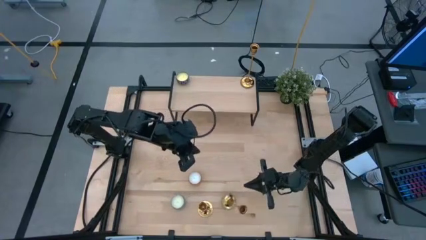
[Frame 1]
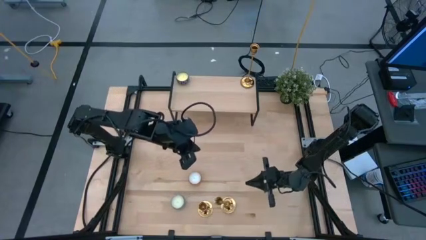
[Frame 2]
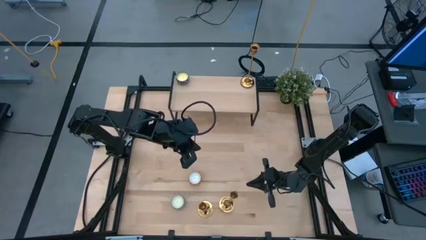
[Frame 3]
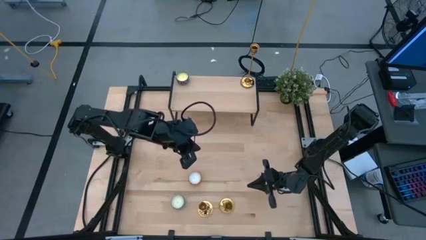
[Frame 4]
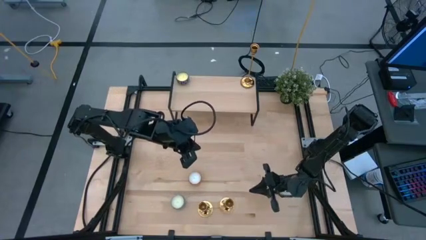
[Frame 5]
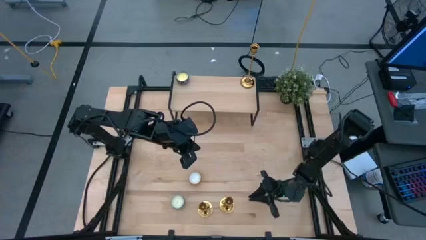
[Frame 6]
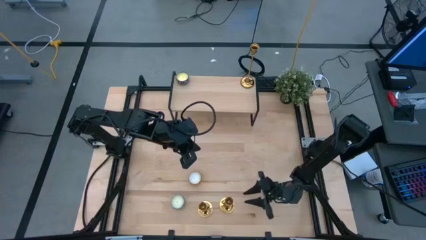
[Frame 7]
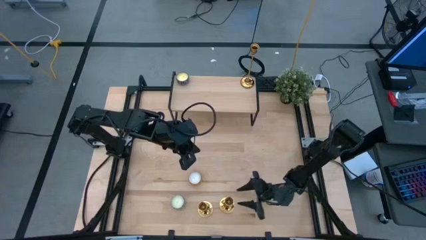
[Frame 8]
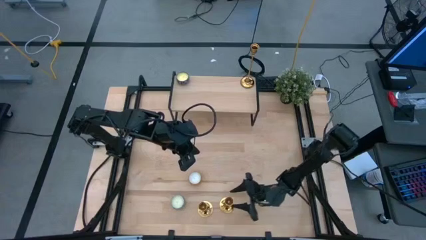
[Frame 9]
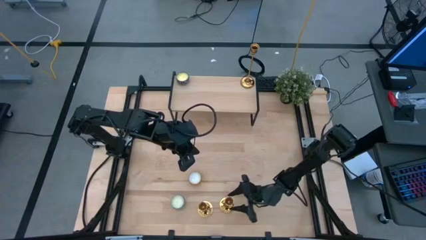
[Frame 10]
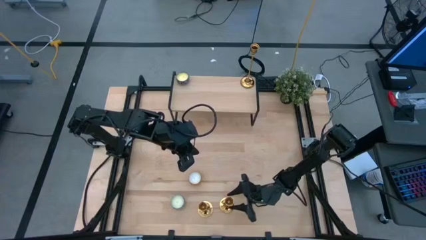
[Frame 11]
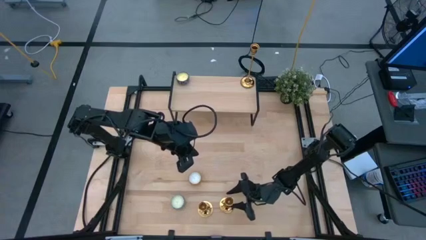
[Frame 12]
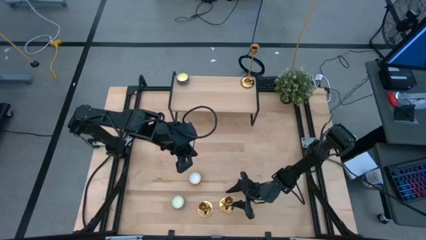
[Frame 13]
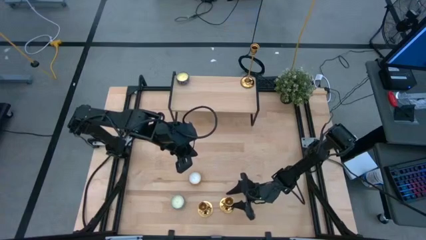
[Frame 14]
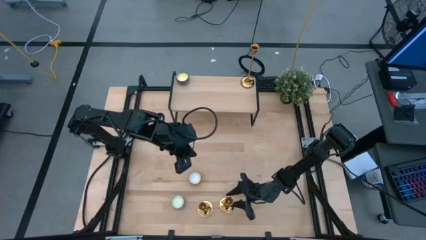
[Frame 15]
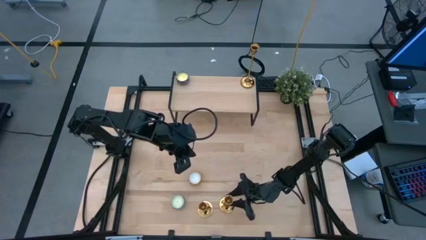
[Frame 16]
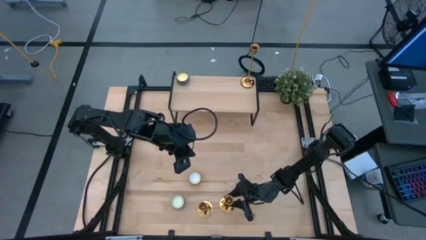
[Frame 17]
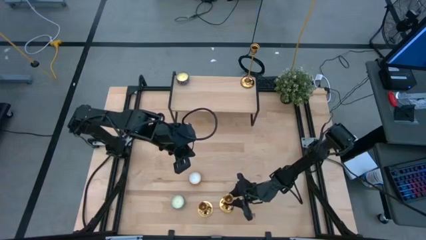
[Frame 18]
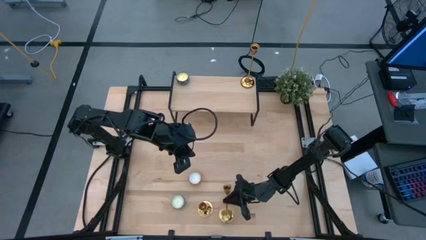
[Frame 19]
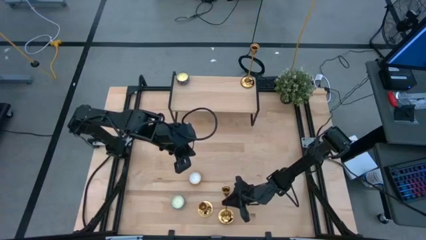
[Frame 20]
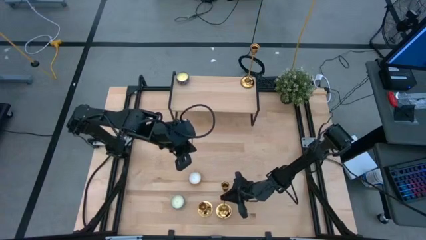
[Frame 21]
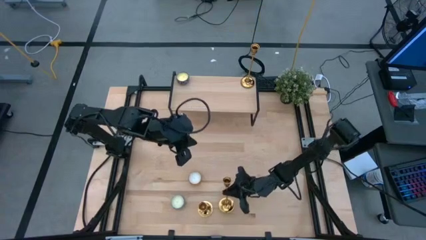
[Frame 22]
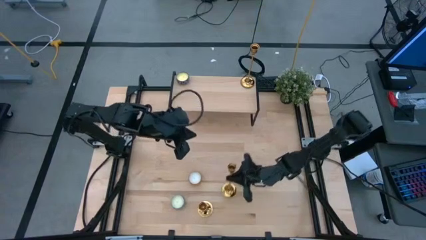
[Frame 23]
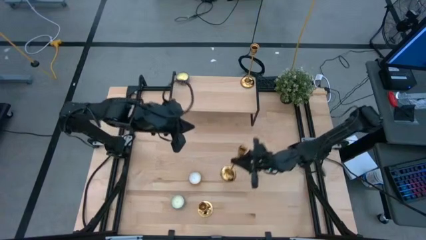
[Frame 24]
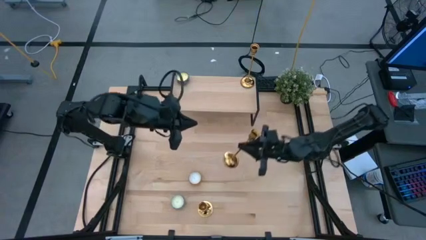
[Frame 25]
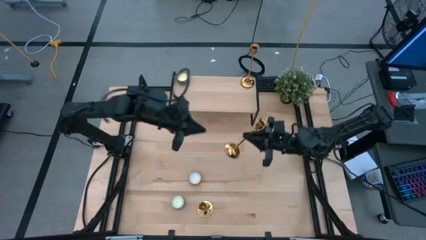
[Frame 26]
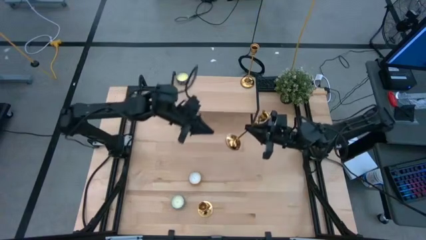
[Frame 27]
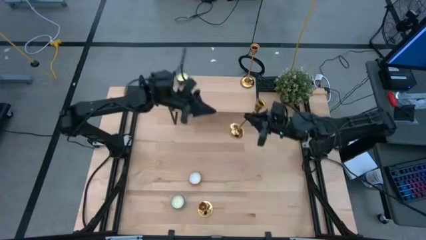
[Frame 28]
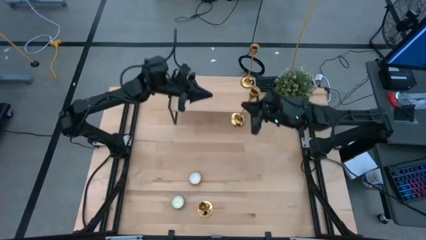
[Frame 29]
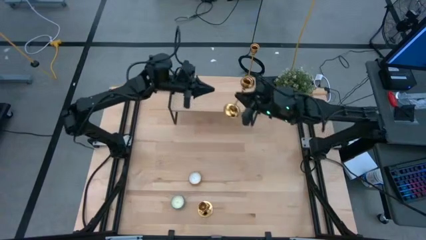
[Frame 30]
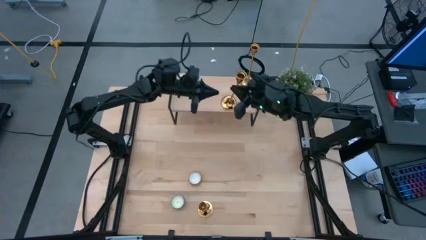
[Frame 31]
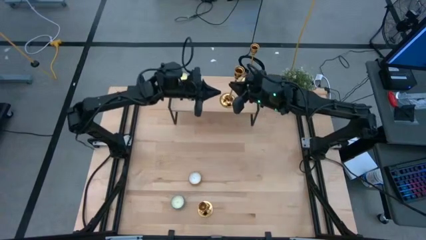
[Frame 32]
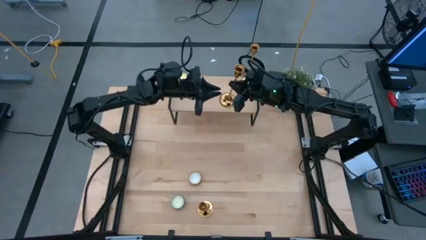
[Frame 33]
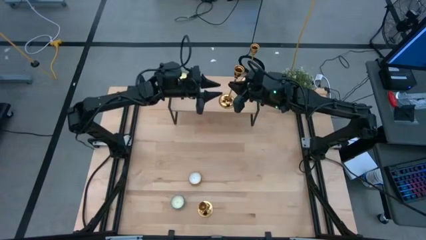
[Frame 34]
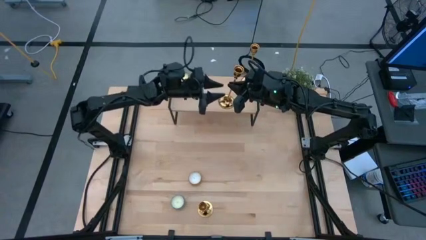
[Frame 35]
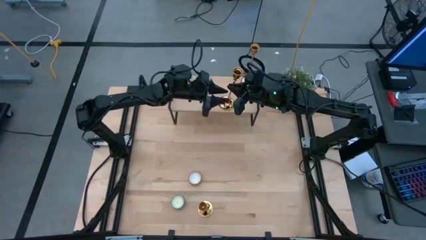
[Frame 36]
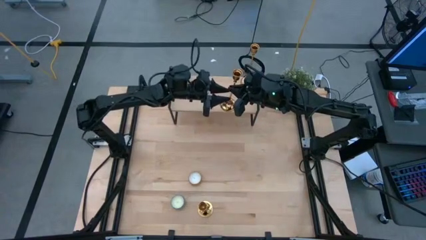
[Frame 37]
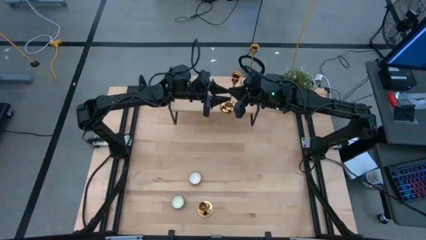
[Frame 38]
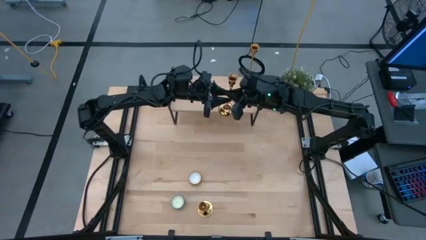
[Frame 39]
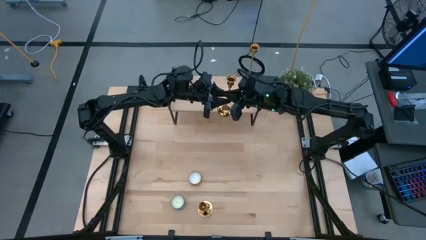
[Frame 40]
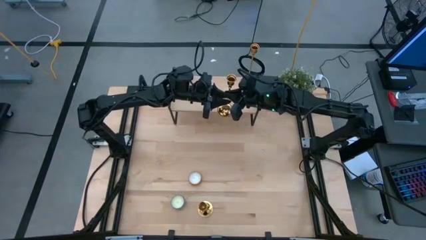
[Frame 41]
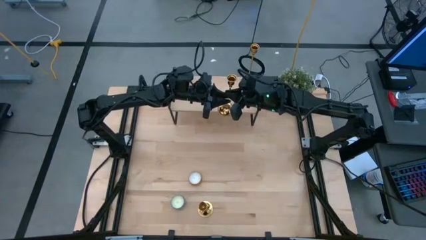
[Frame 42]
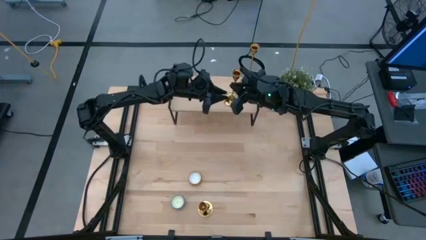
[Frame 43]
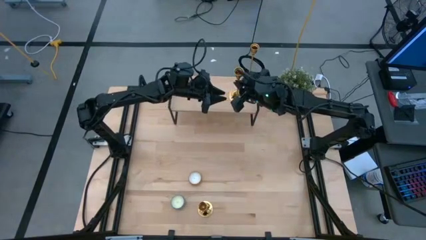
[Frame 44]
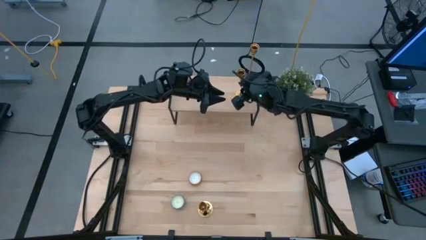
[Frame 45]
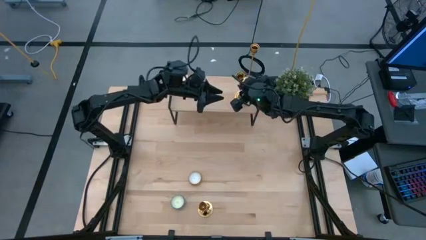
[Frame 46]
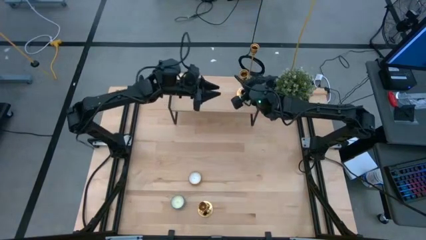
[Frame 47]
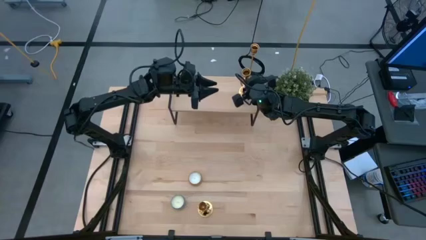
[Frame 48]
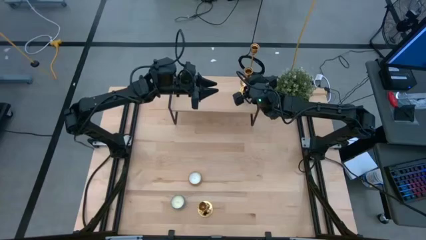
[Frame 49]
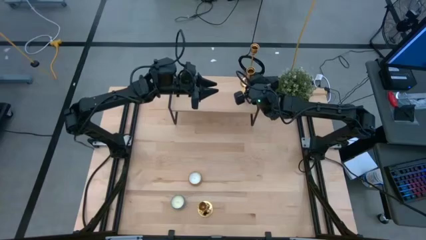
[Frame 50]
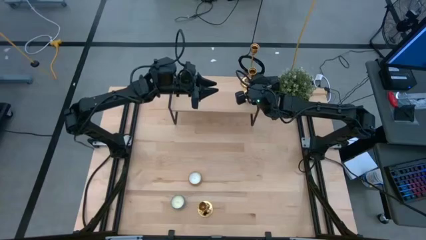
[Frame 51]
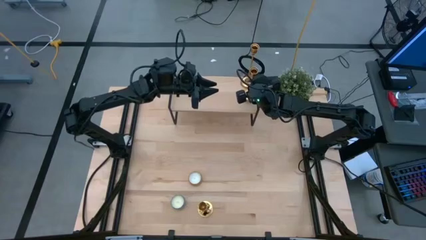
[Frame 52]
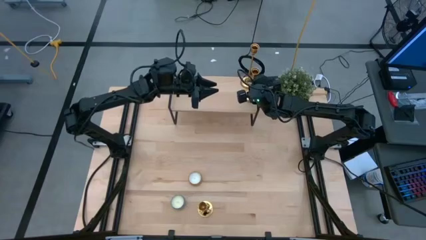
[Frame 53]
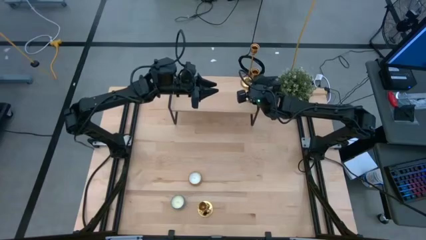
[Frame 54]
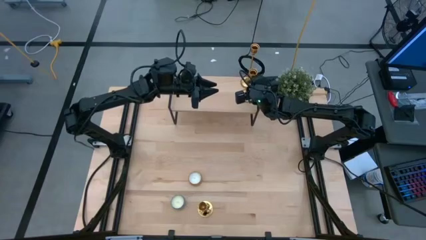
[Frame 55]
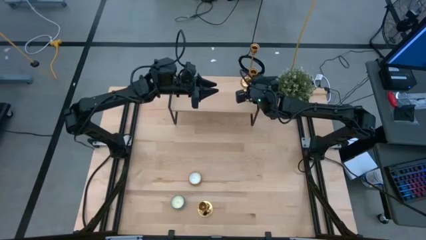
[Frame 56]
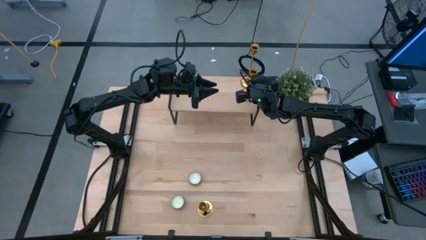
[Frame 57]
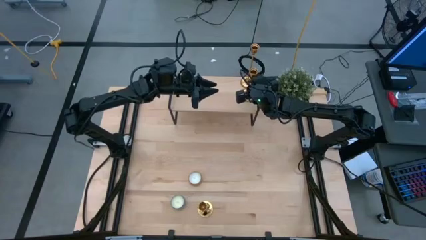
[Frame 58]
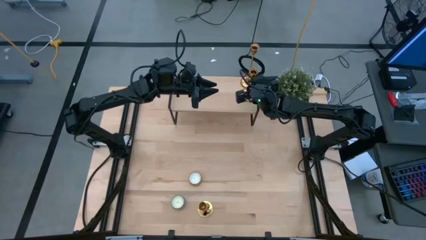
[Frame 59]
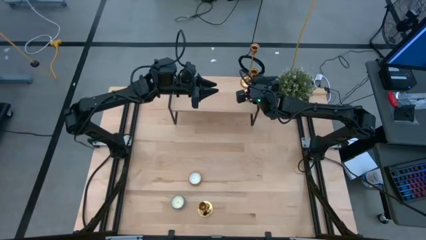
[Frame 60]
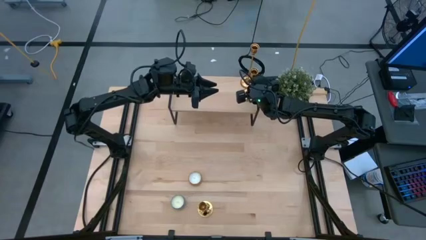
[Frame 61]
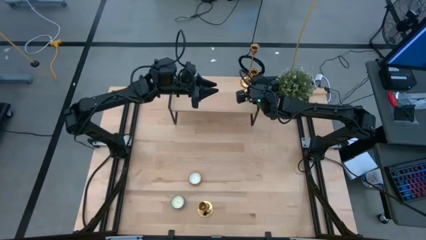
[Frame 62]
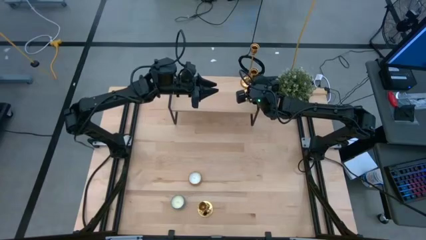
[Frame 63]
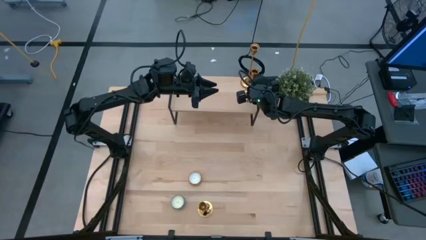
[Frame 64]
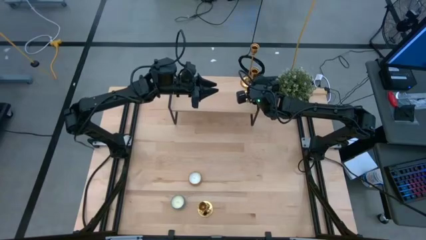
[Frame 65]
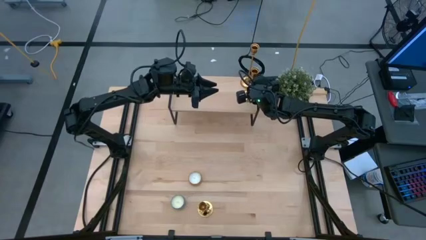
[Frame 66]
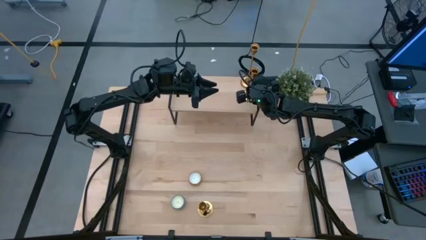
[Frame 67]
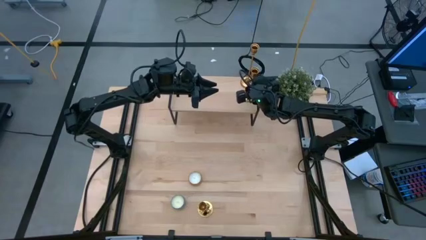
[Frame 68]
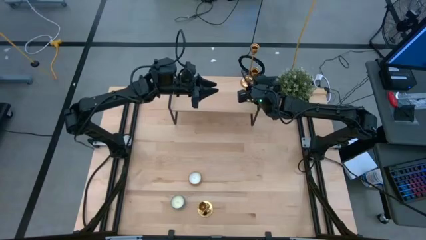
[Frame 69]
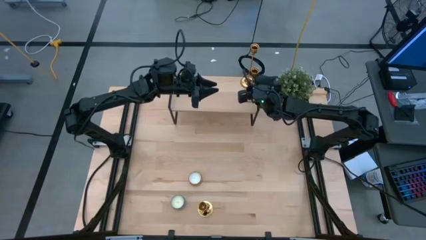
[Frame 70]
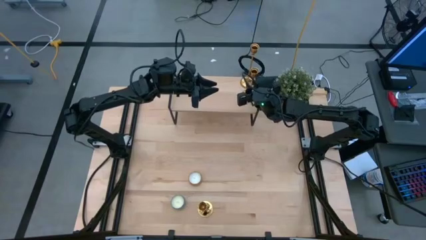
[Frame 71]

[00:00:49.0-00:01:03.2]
Task: Pick & Place candle stick holders
Put the right gold candle holder on the shelf aligned with the other gold candle holder

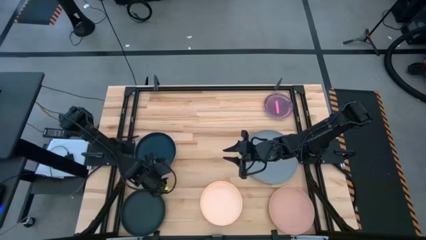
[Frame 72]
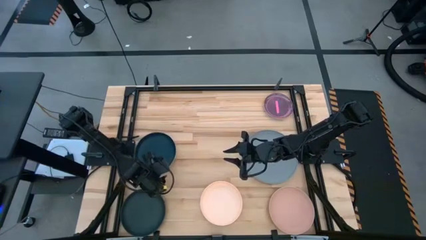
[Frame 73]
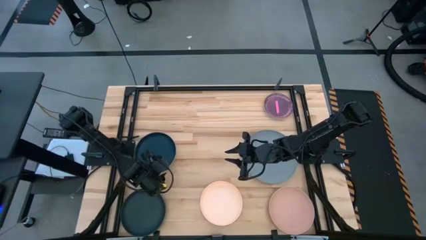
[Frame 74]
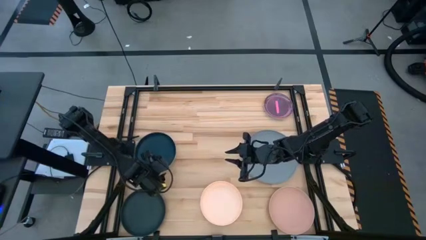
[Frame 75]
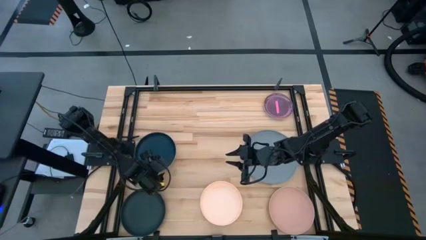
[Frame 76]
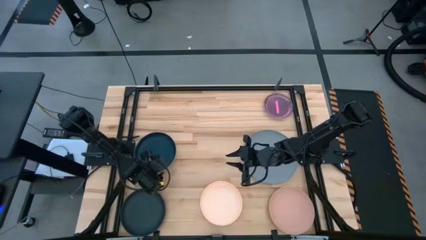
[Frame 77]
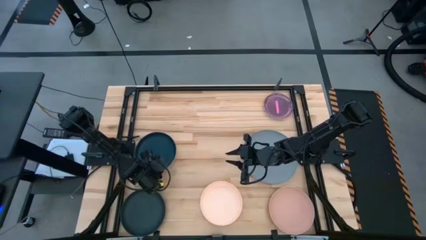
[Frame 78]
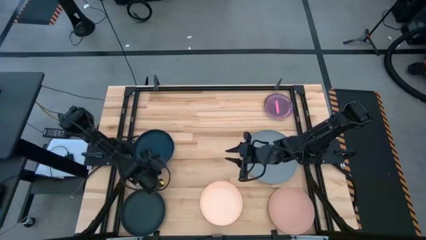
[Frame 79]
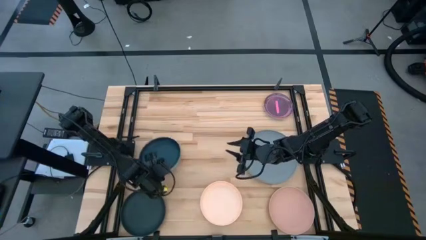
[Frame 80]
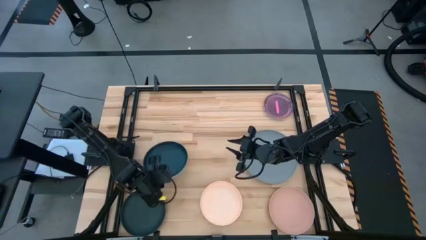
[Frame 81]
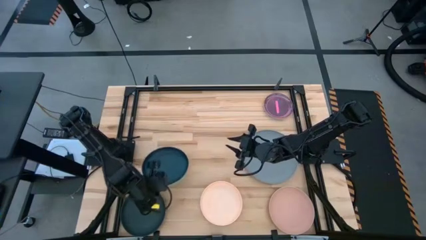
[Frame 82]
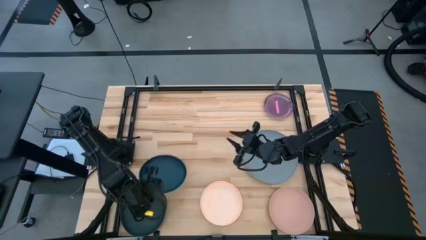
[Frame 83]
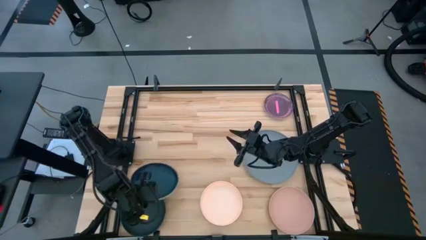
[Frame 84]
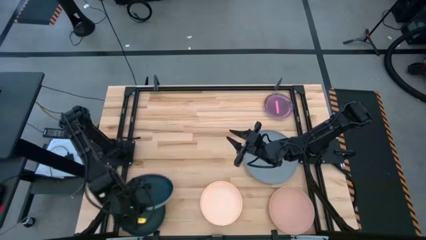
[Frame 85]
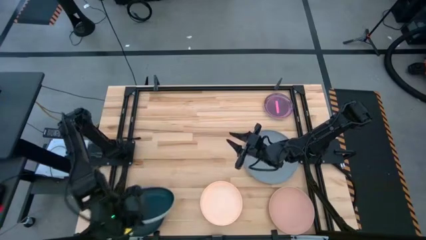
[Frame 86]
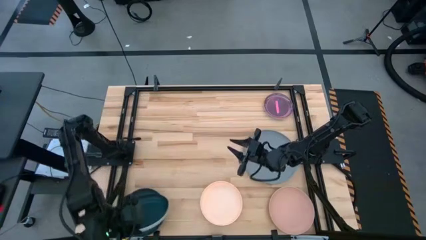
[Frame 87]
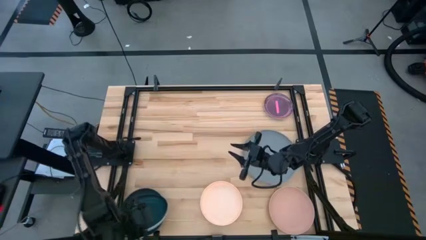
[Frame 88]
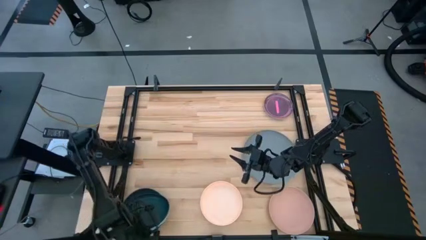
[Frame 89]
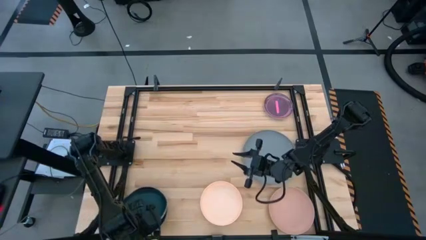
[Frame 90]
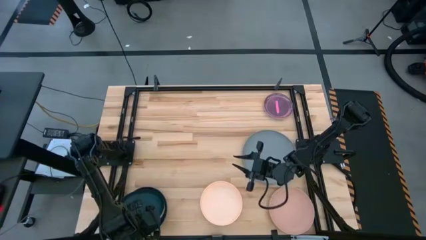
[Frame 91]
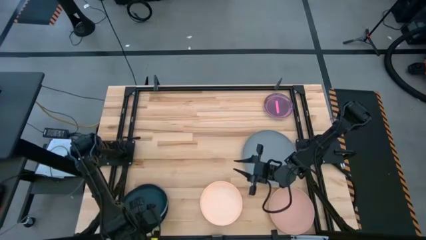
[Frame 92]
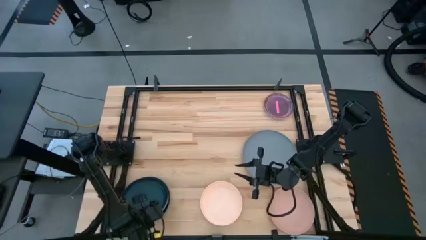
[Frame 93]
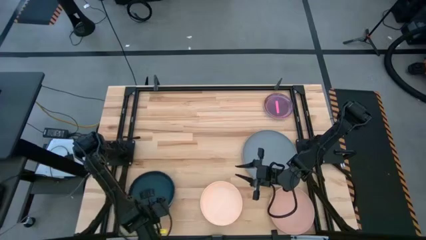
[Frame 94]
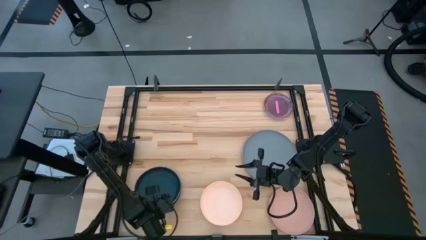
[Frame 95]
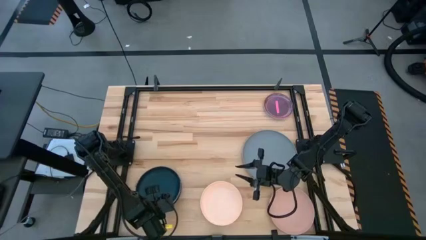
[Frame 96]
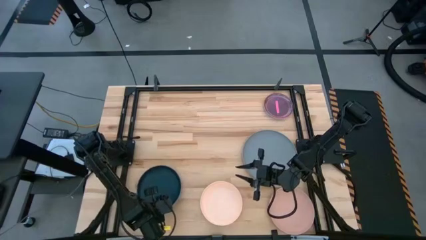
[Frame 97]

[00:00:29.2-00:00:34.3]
Task: Stack plastic plates
Stack the black and gray plates on top of the black plate
